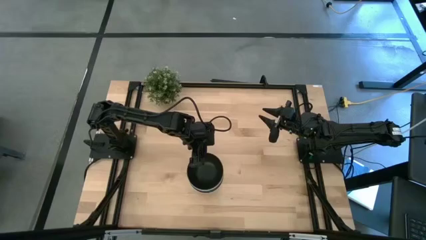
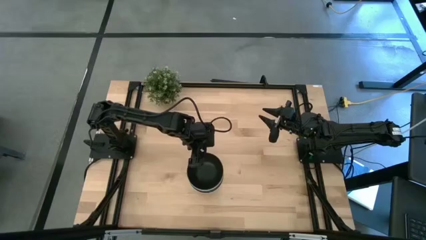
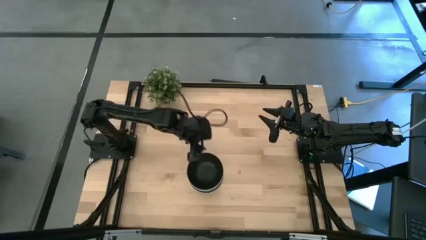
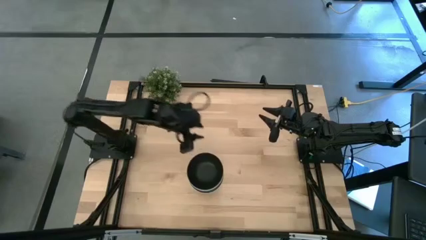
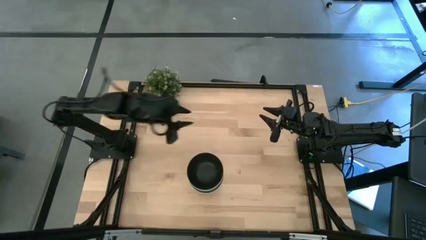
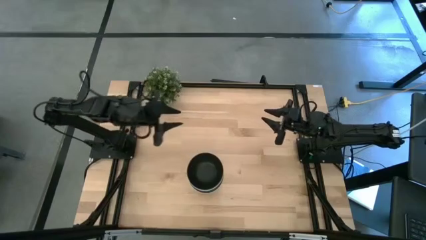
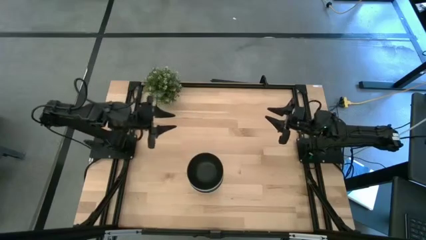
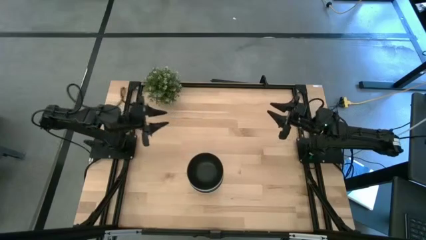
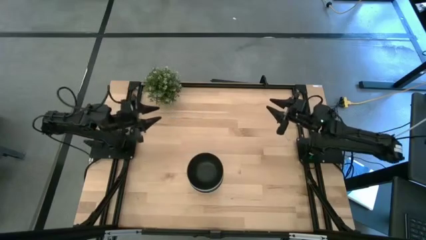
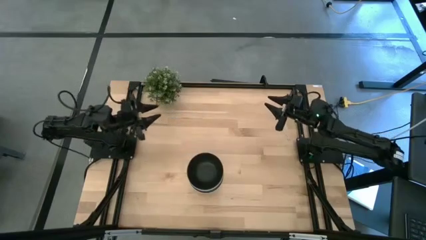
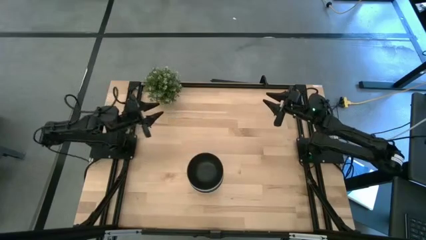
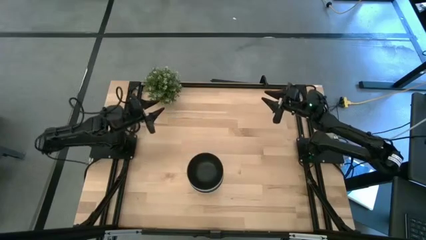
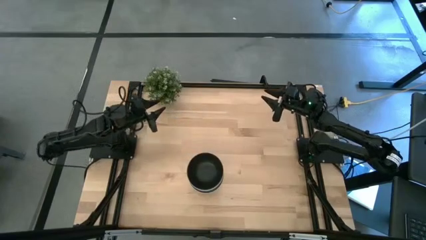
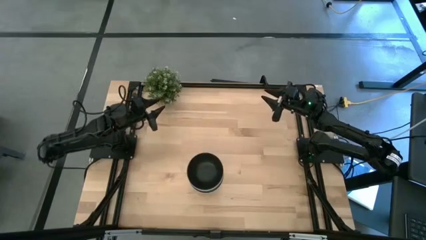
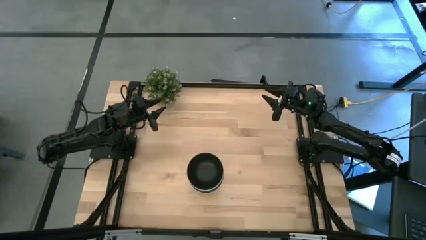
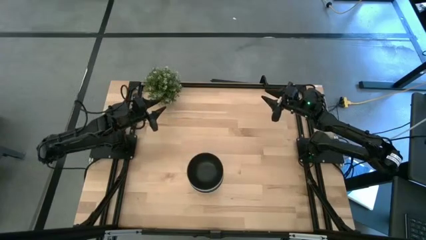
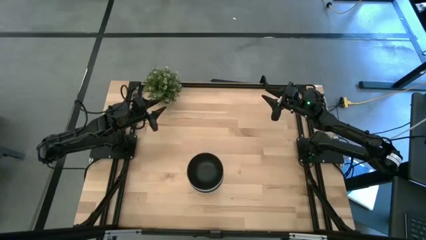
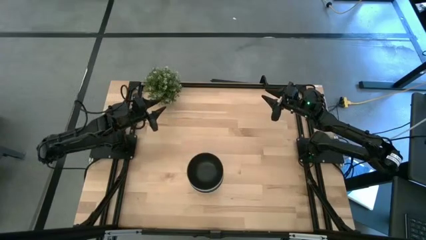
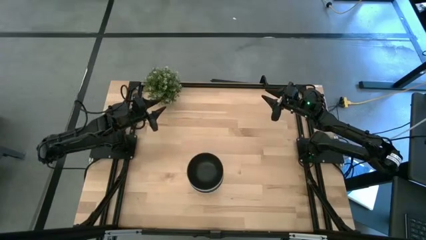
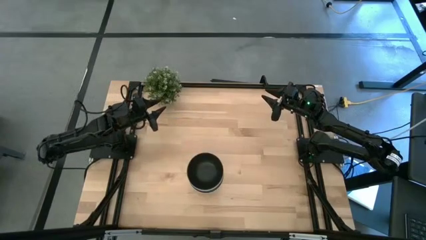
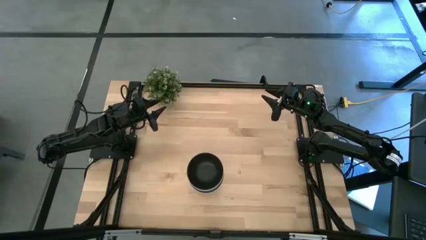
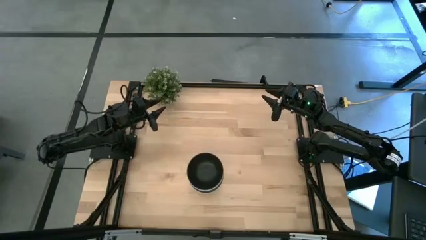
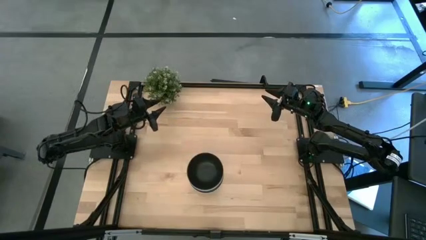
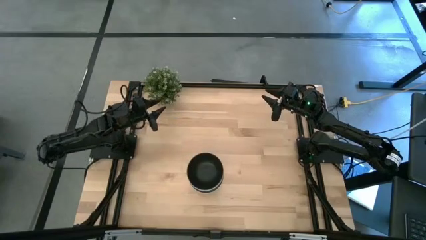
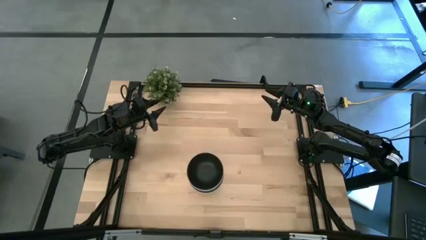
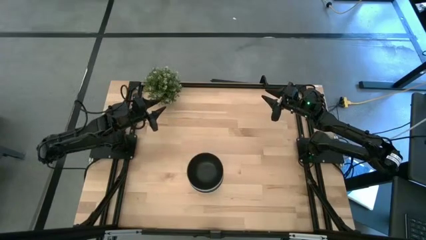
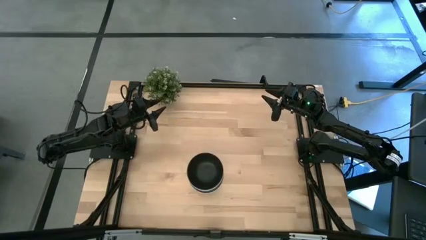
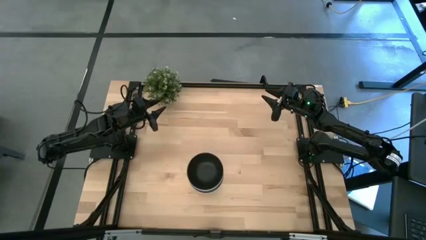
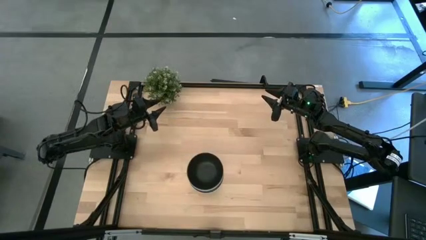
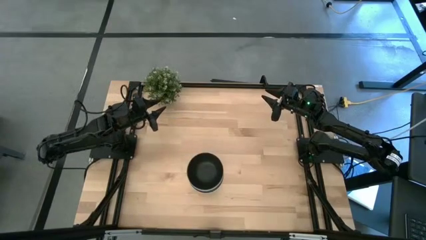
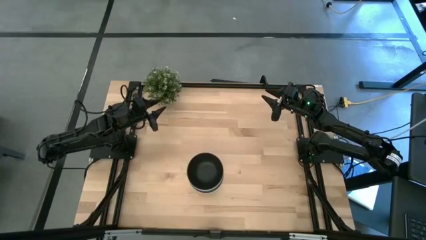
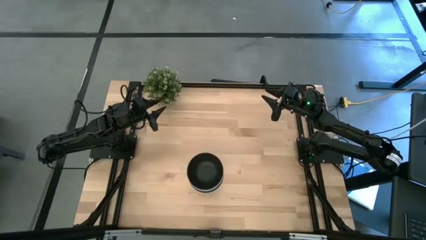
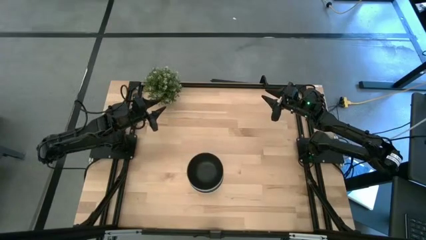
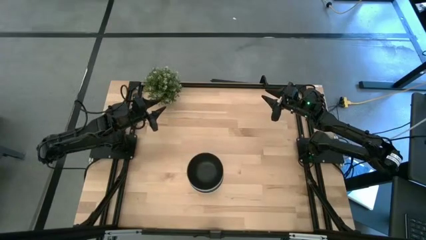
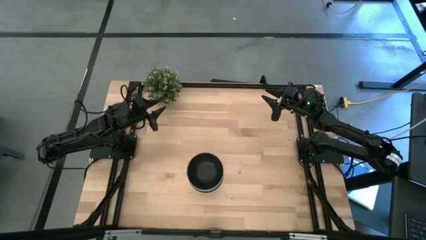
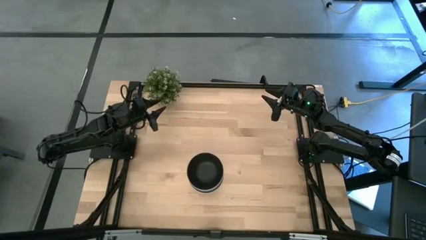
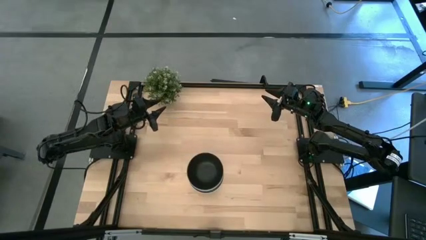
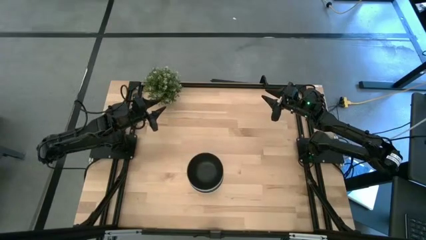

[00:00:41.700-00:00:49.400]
Task: Nest bowls inside each other
Return to Home Position

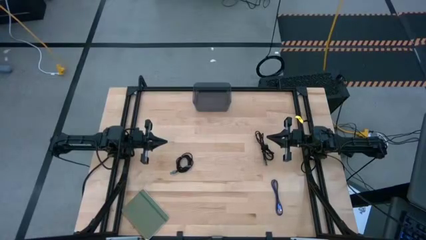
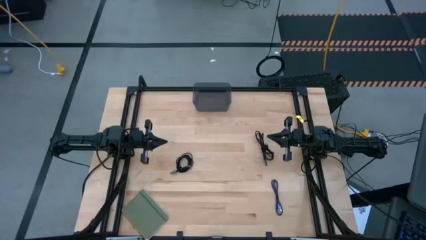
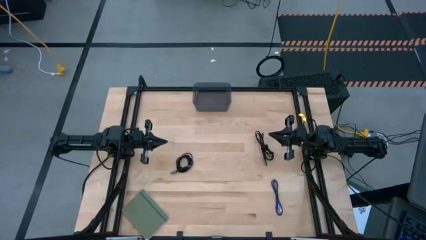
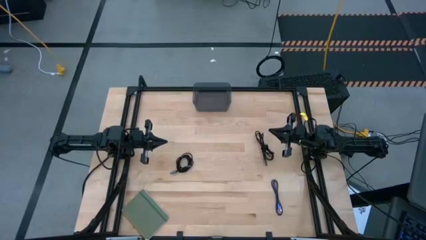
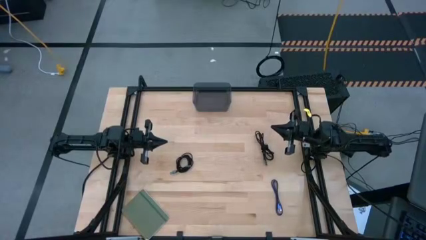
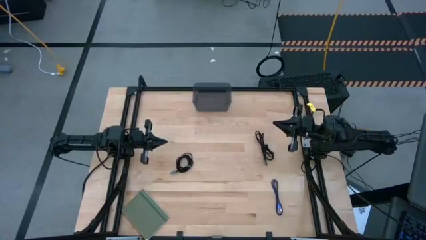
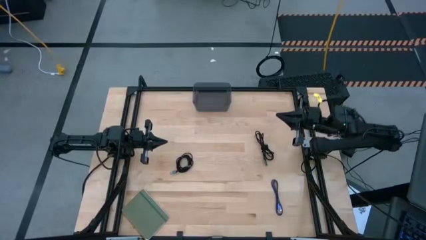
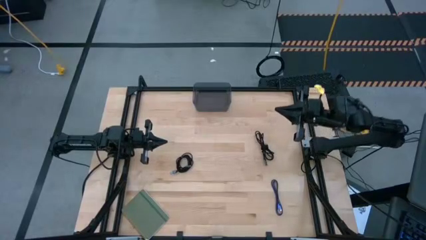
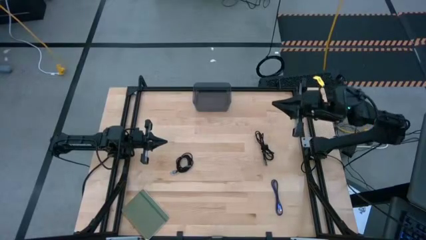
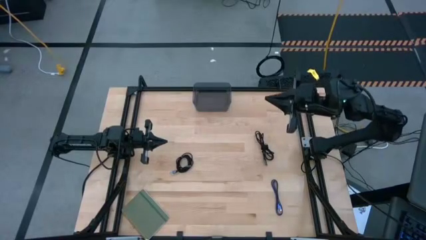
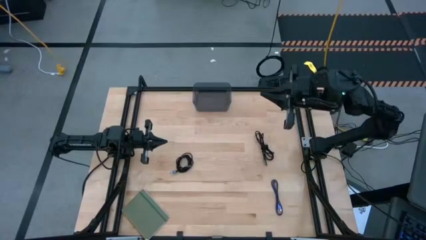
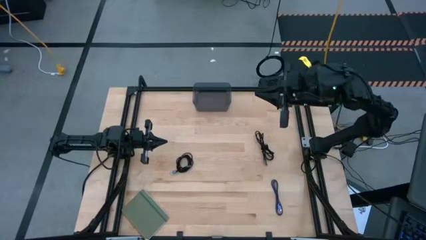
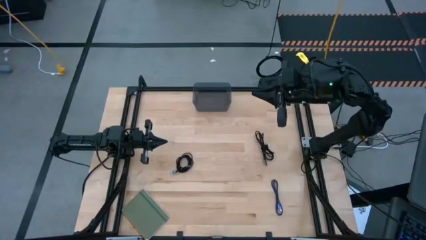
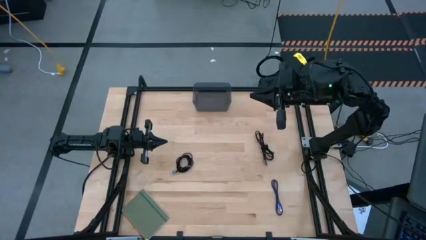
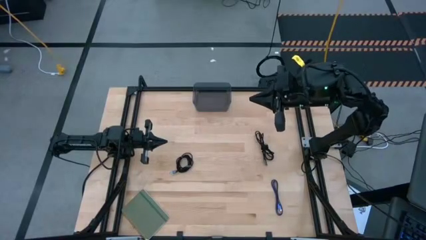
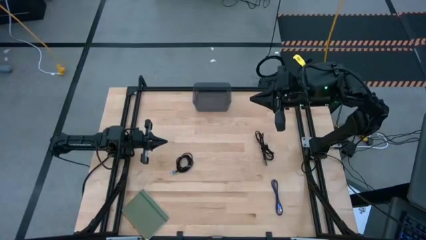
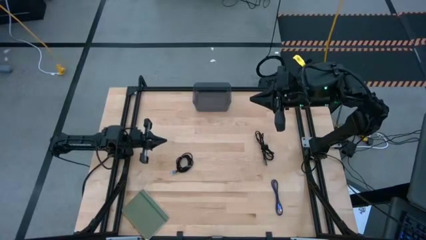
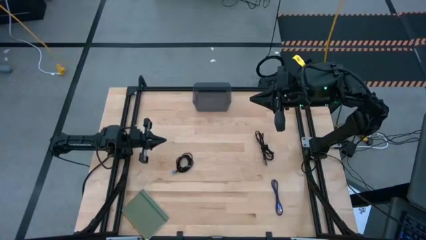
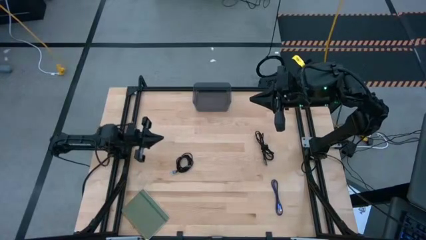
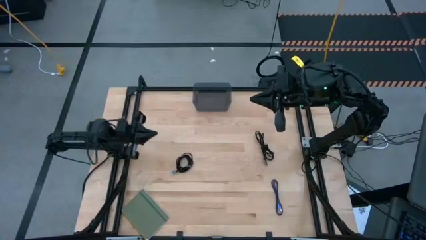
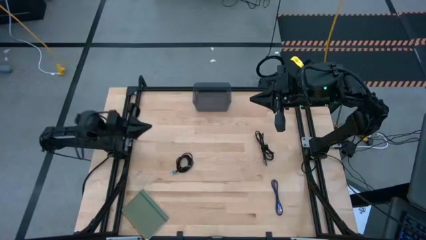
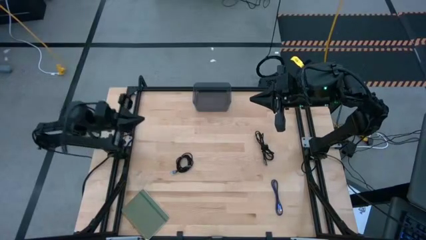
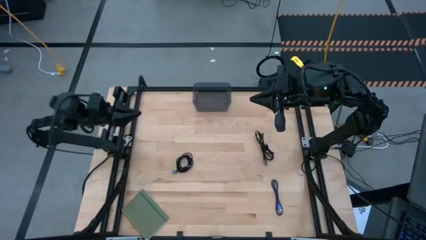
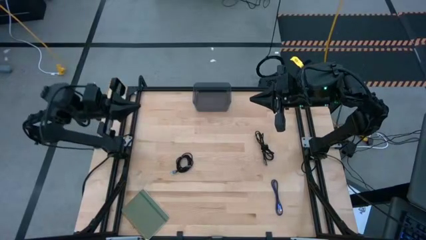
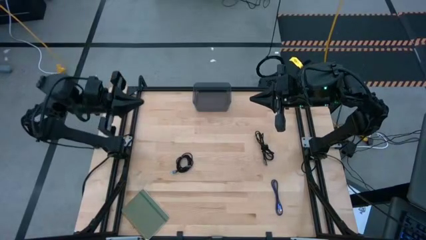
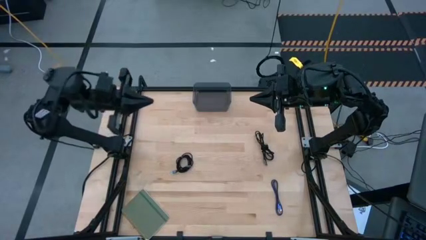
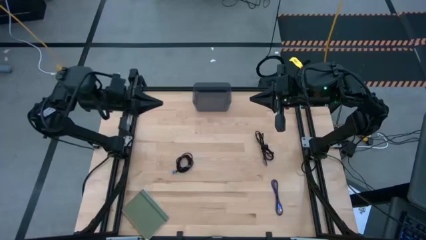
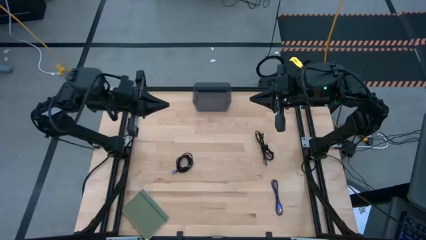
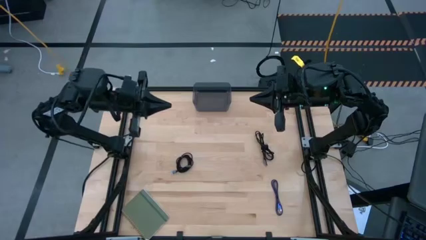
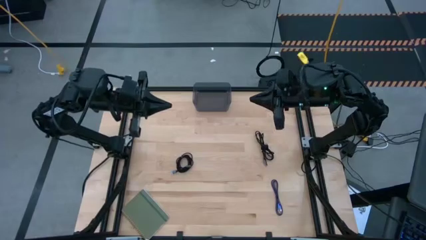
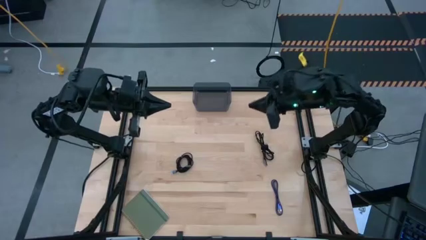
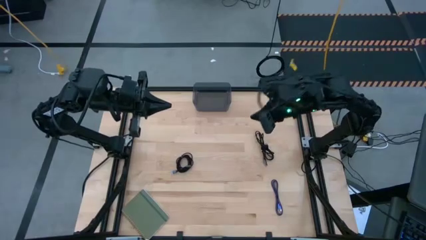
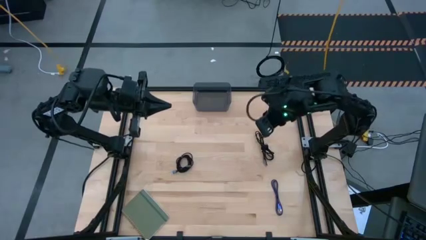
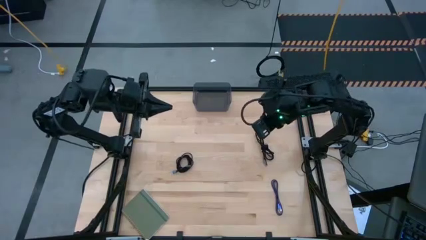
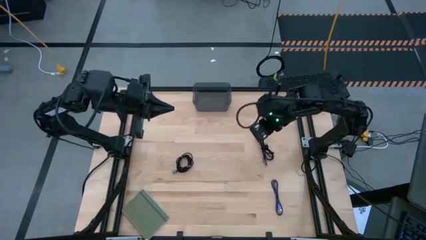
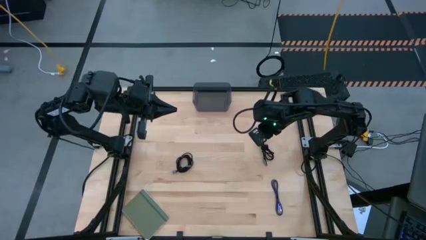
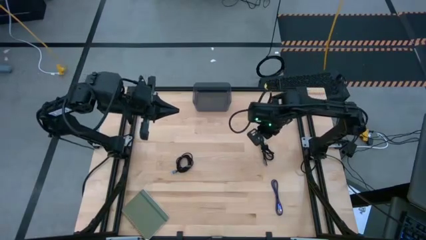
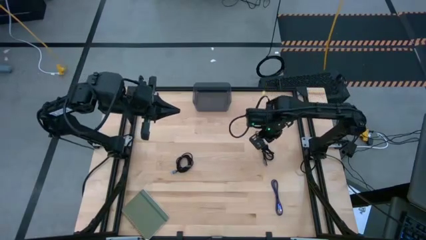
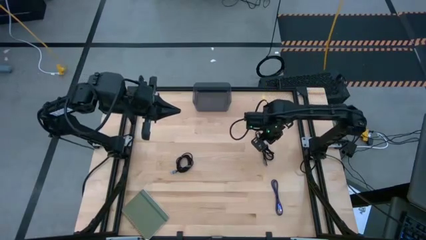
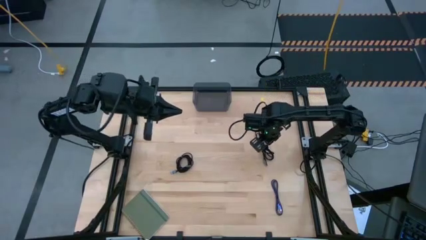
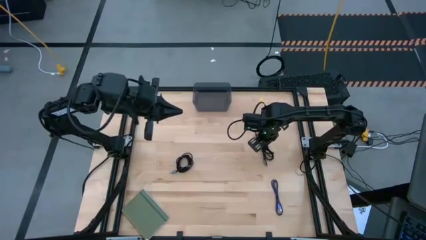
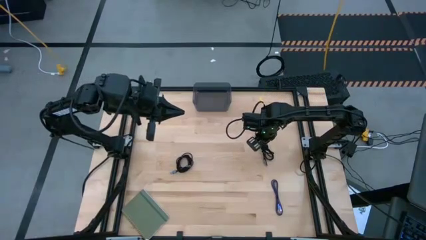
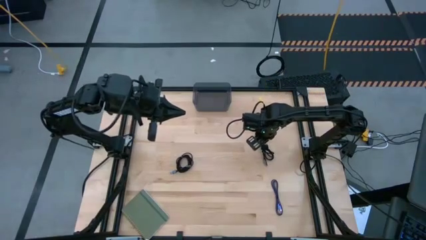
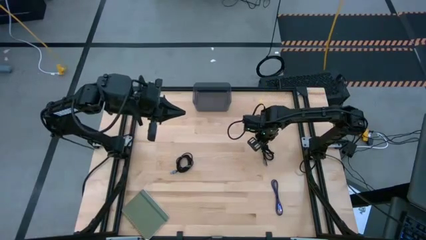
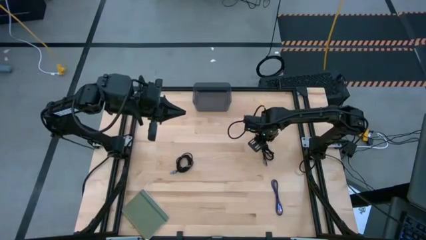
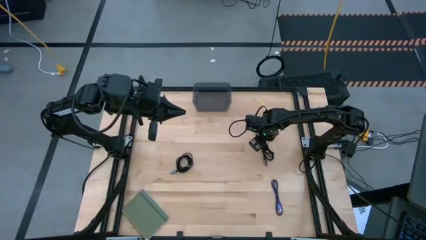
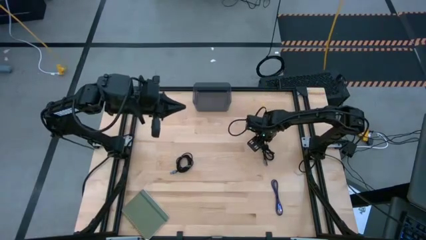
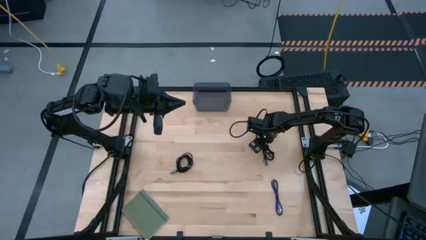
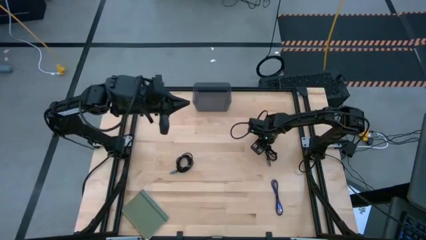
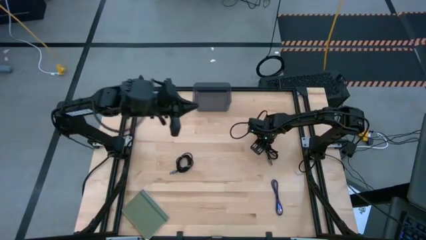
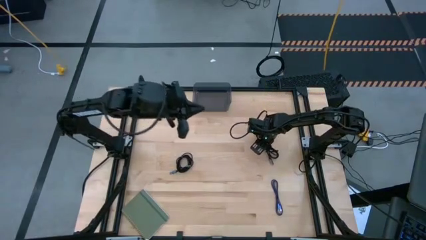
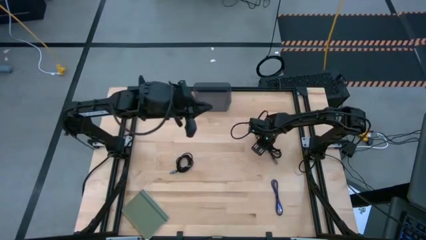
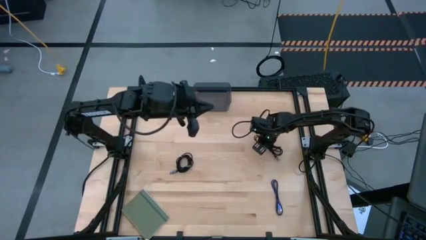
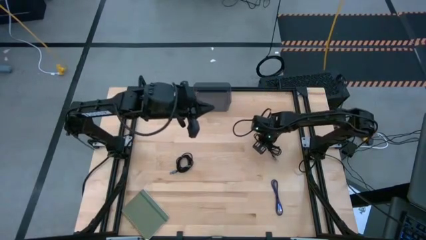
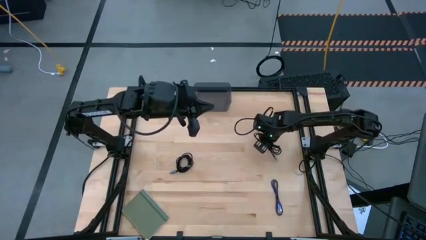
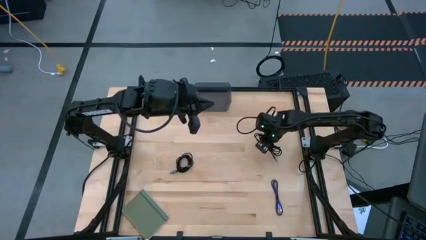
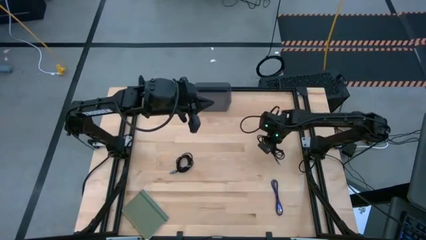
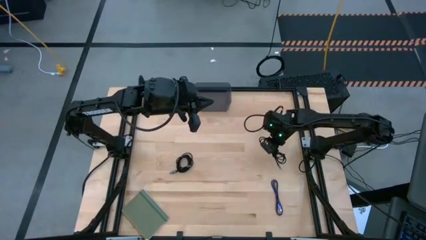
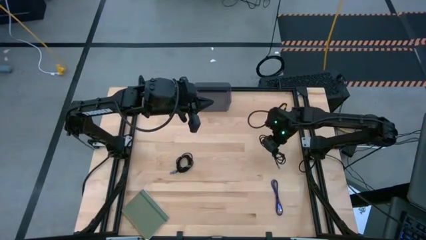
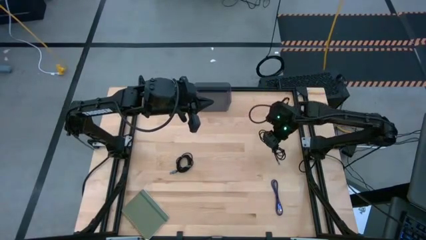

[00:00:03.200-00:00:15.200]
Task: Pick and place USB-C Cables
Put the right black USB cable into the black bin
